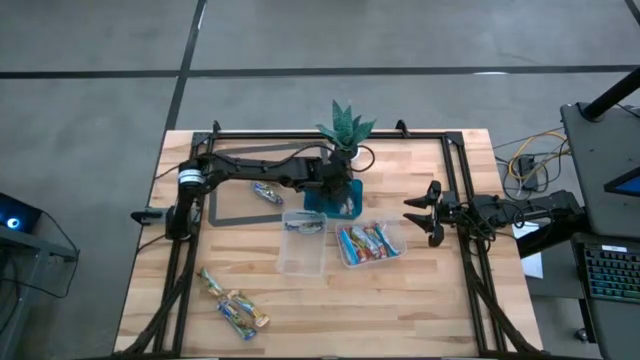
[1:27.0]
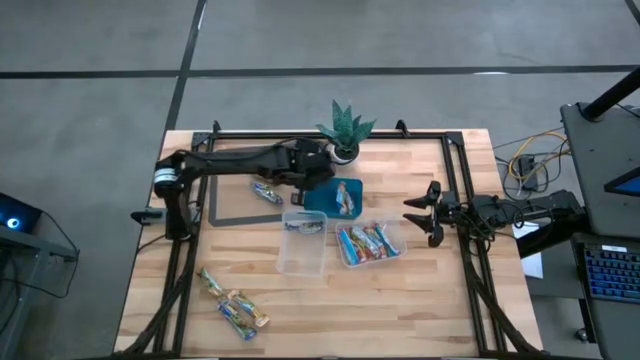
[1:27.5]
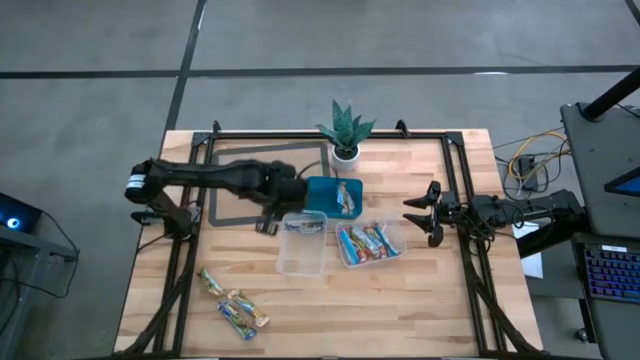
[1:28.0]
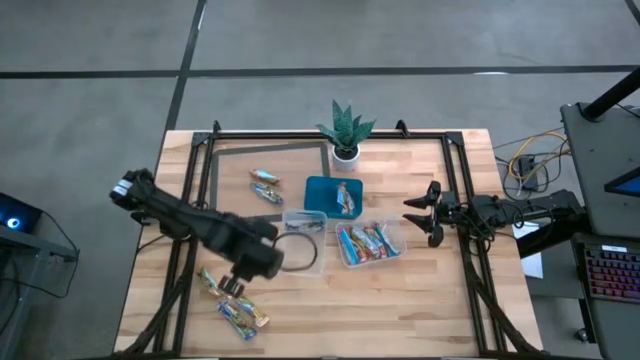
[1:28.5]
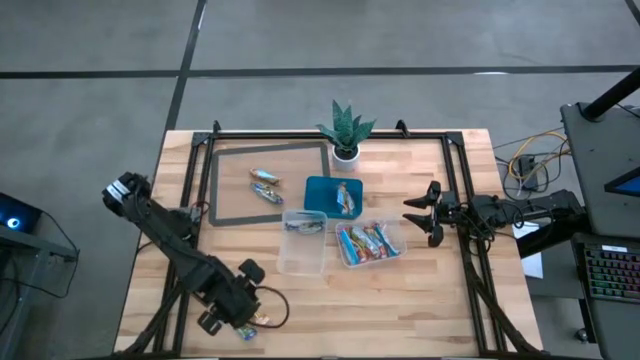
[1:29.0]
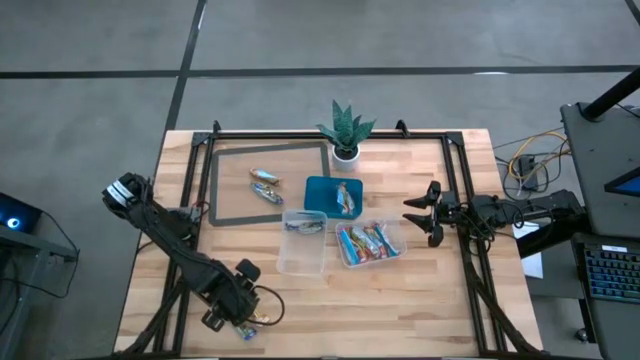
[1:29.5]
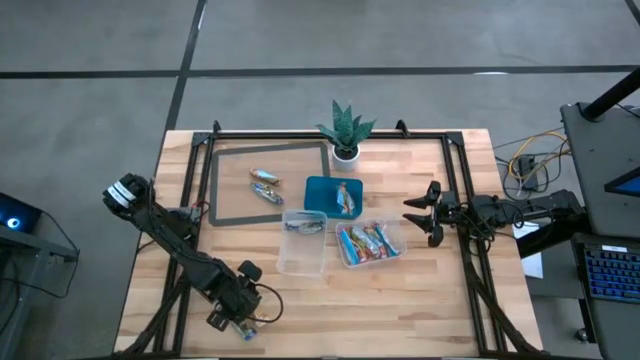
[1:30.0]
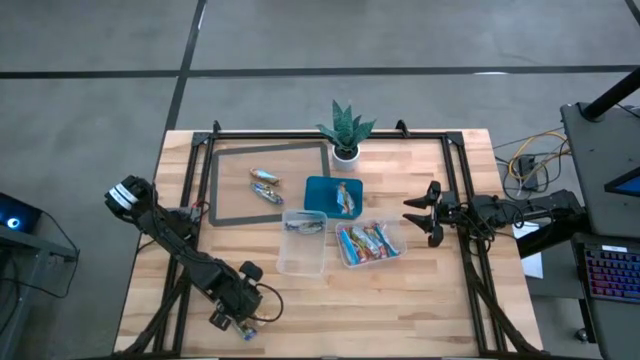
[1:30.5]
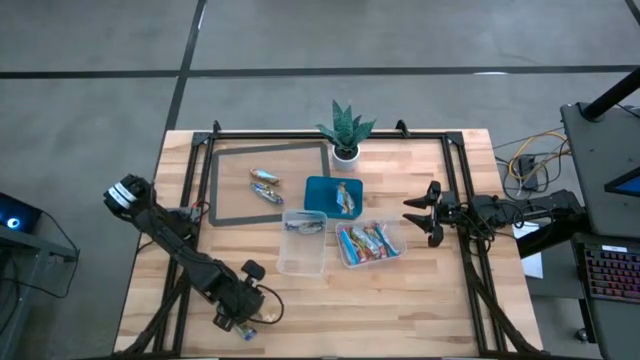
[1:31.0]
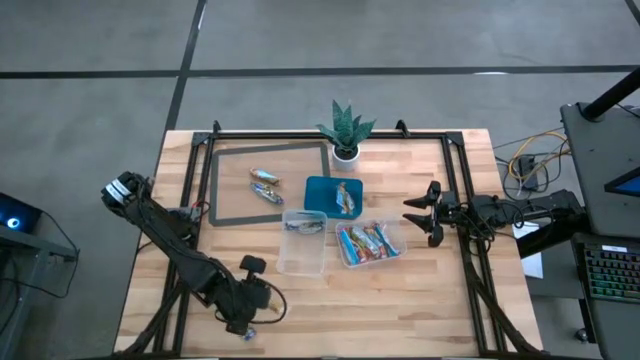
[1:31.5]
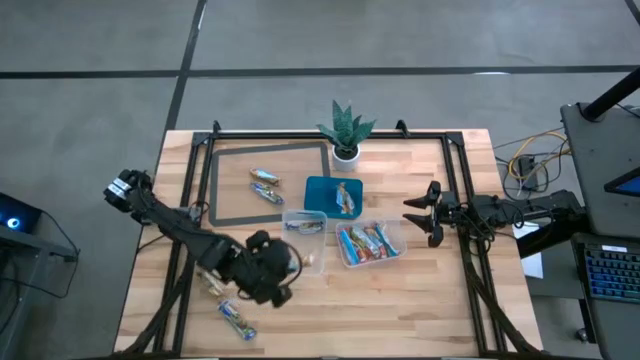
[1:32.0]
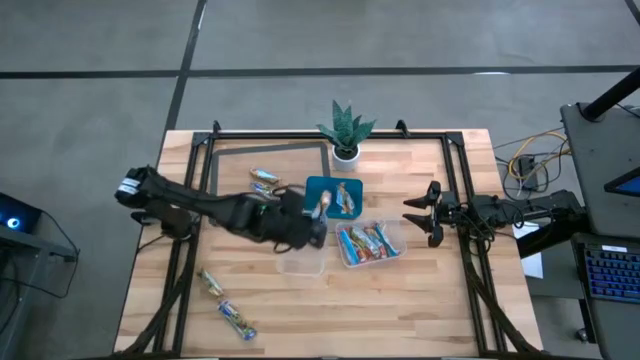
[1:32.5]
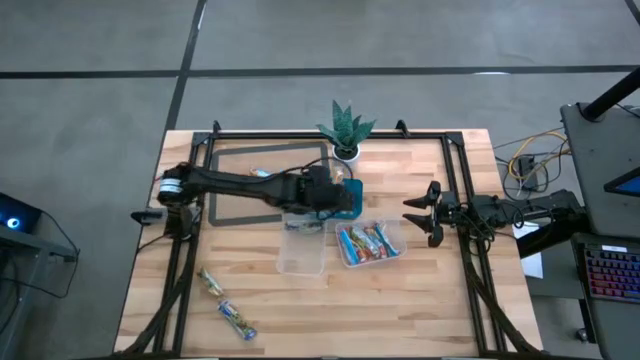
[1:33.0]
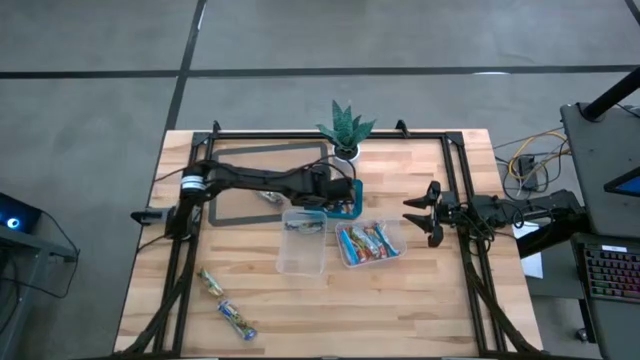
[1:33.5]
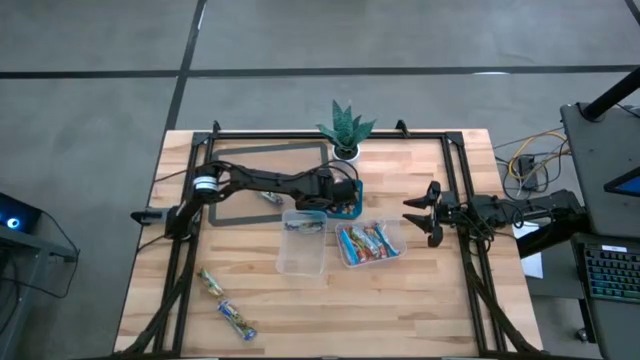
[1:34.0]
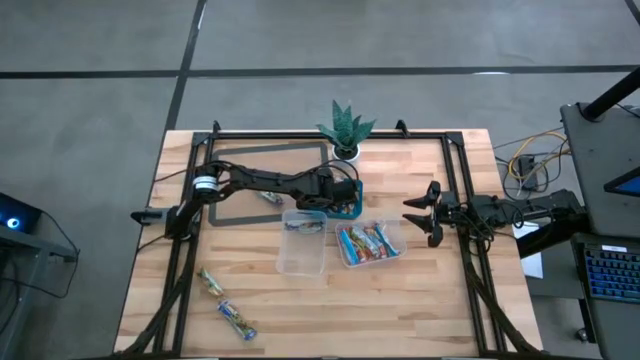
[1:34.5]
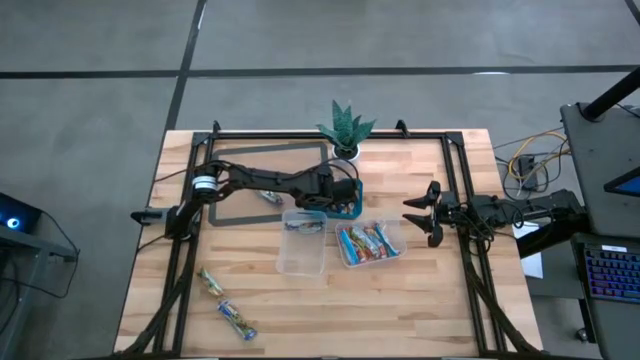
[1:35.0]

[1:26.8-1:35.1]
Task: Pick and place Granola Bars by type
Put the yellow granola bar into the blue bin

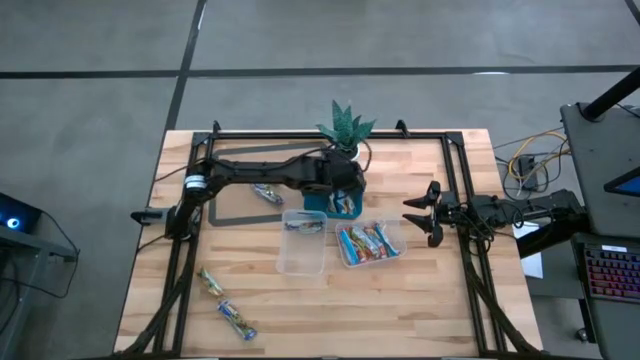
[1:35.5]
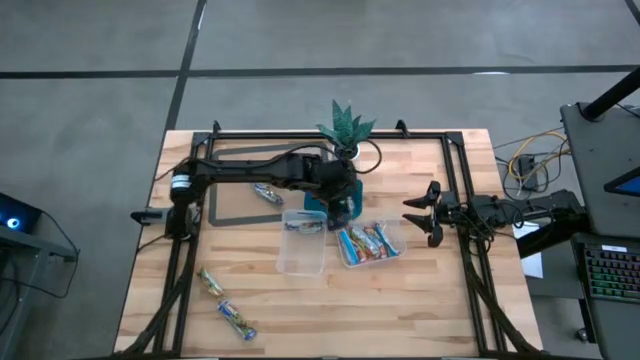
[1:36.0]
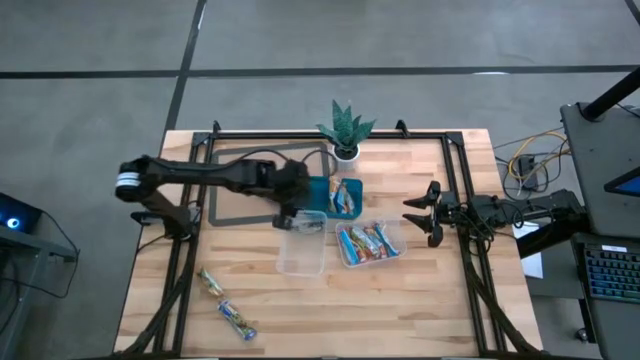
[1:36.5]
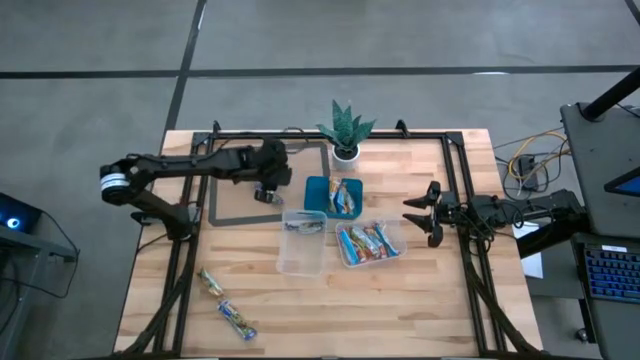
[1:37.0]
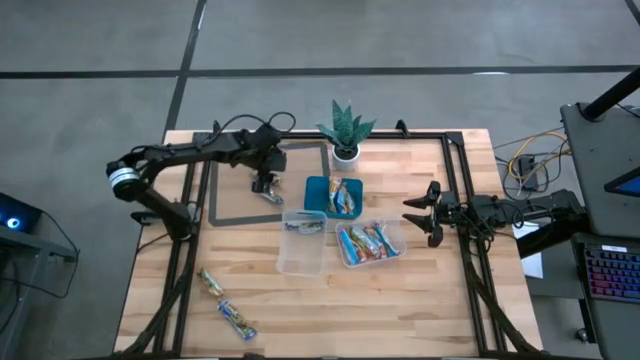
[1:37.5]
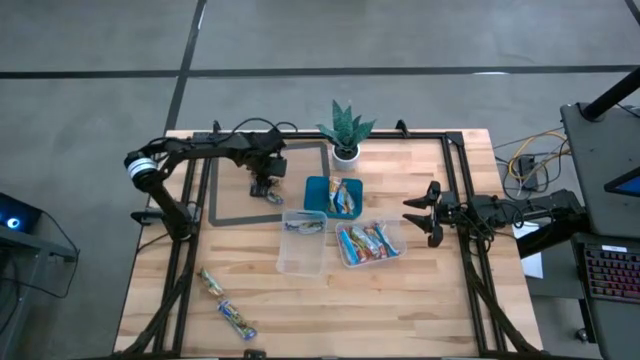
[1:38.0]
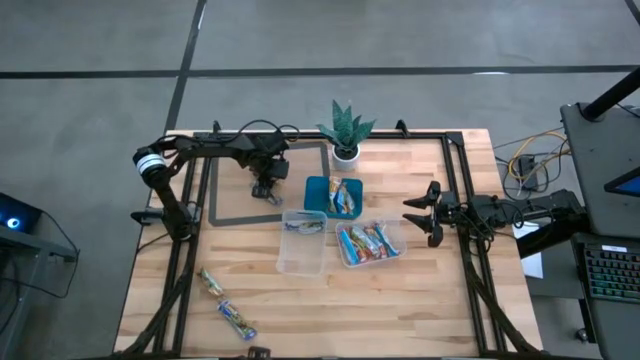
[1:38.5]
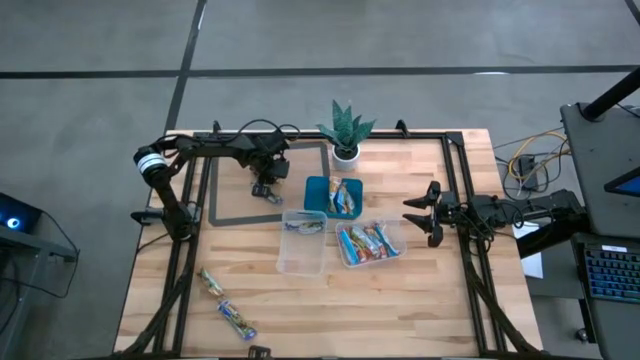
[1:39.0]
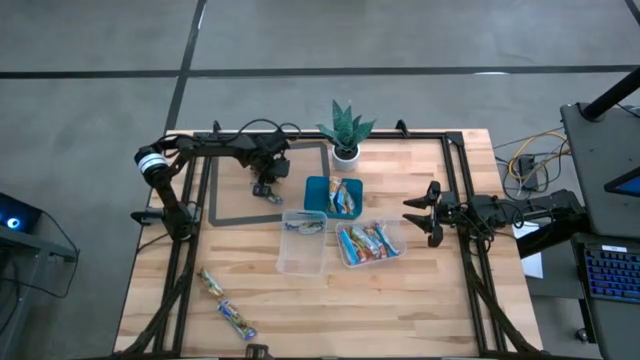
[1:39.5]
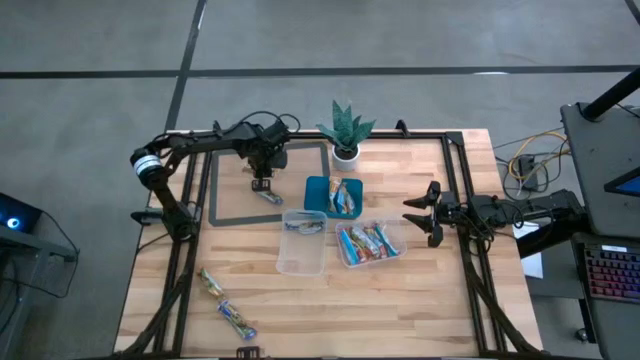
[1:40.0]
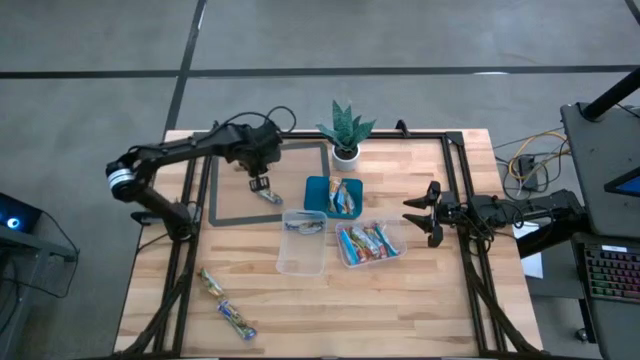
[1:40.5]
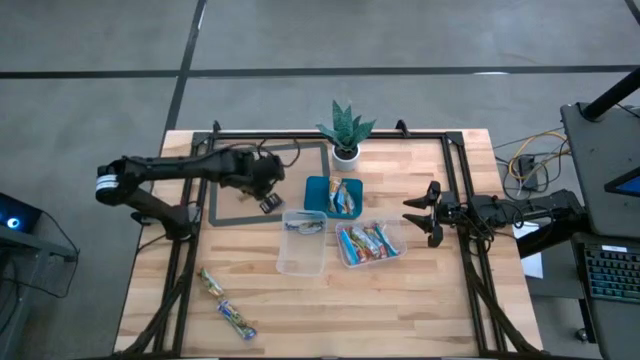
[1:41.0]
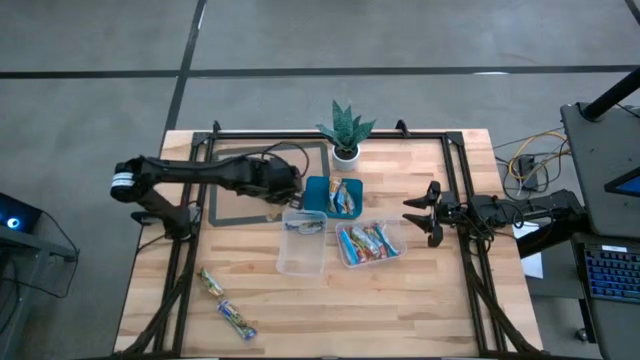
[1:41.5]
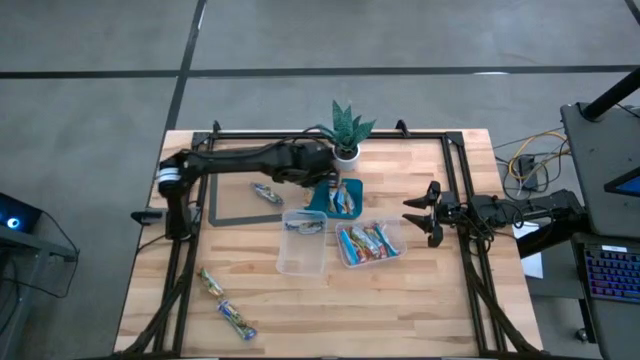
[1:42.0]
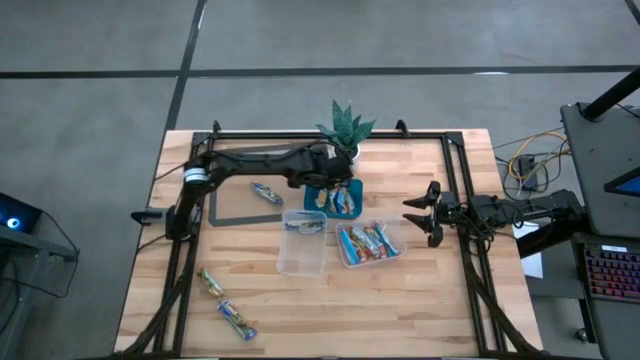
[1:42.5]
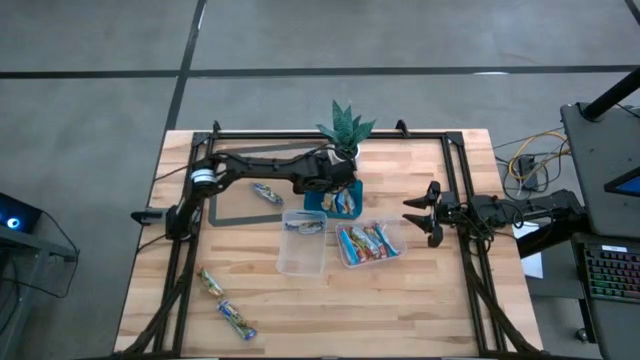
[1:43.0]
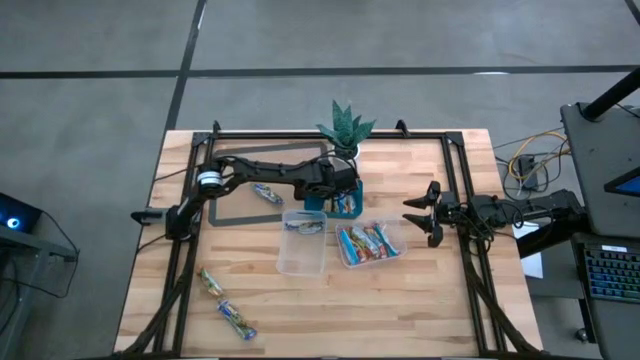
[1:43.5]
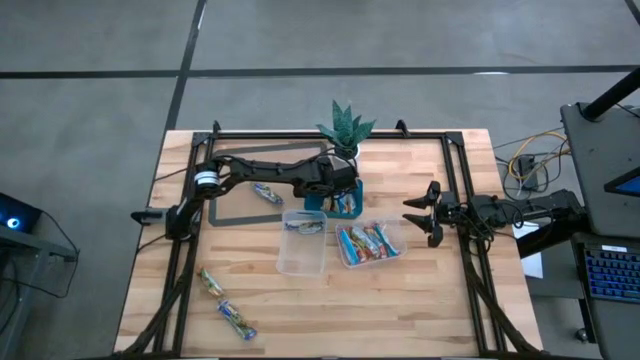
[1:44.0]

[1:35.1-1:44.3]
Put the yellow granola bar into the blue bin

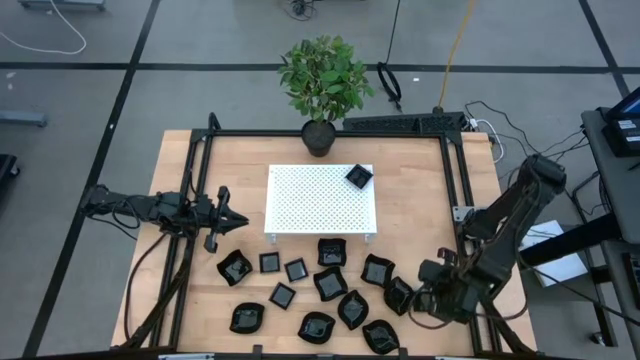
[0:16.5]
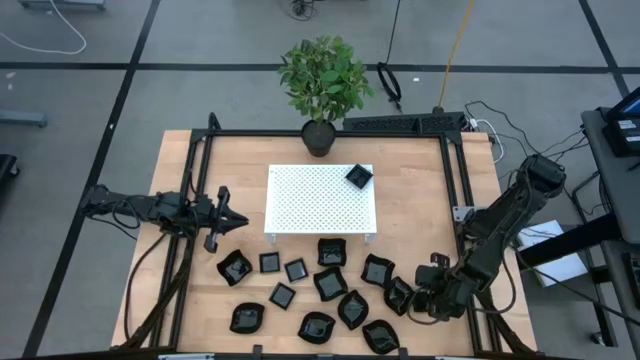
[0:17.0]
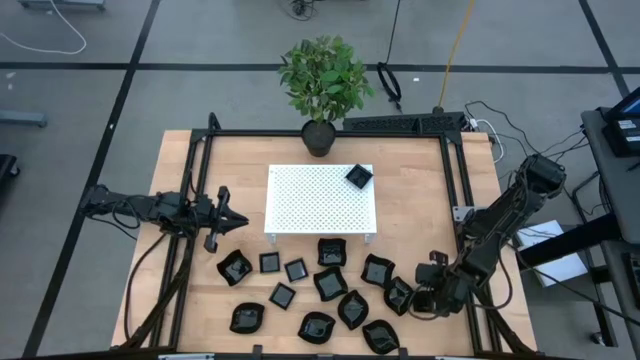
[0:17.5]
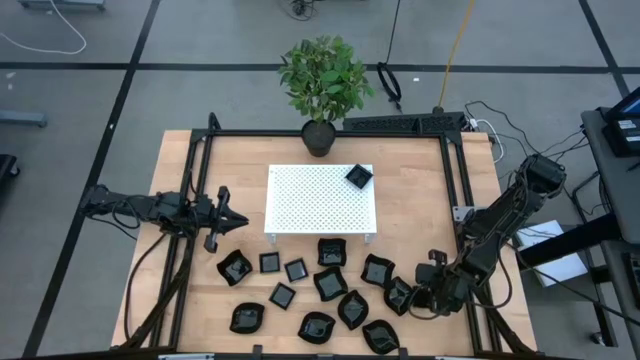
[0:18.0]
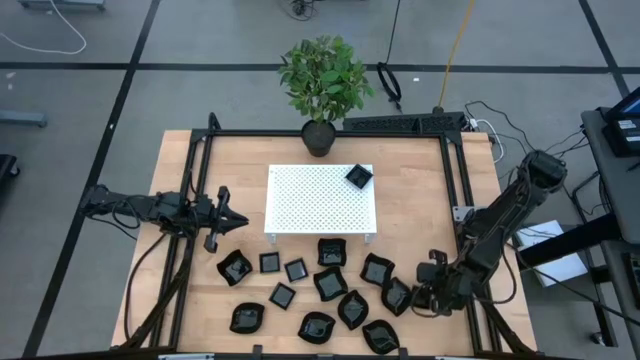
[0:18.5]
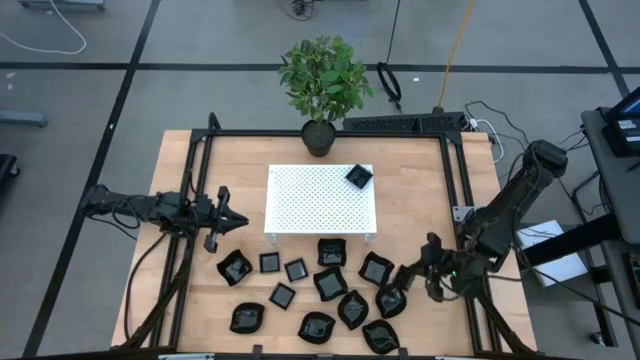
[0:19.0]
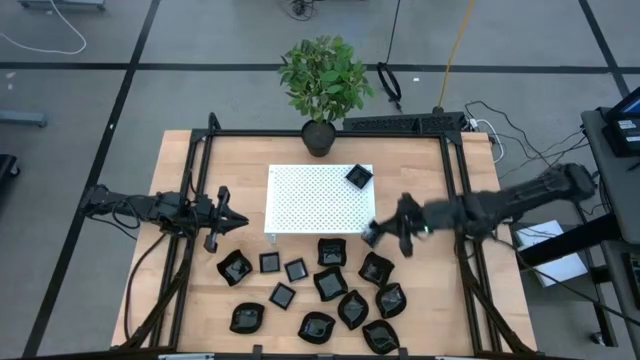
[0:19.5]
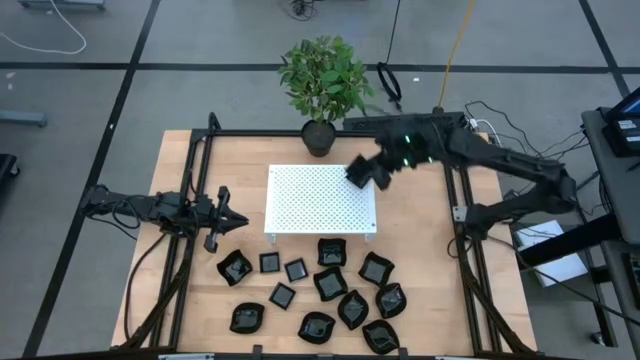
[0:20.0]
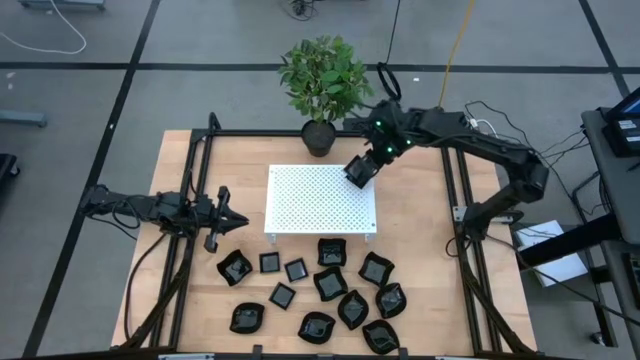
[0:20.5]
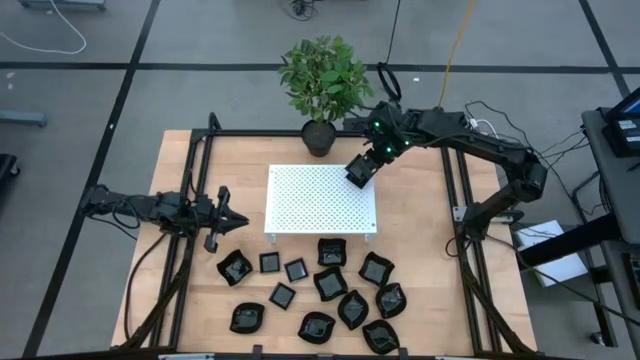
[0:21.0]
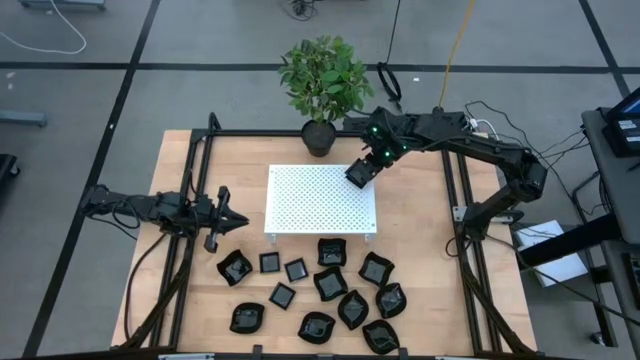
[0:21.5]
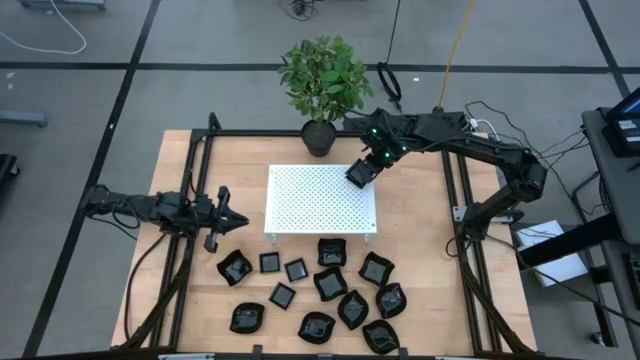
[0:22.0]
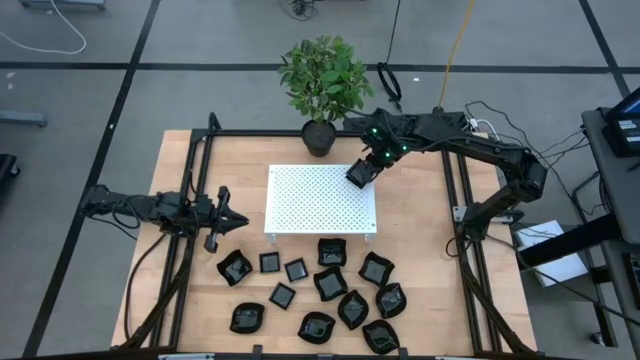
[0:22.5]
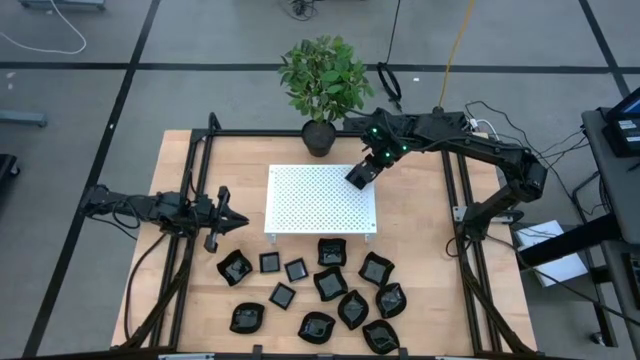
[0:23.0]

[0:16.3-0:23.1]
Task: Pick & Place Mini shaped plates
Stack the black square plate on top of the black square plate on the shelf
